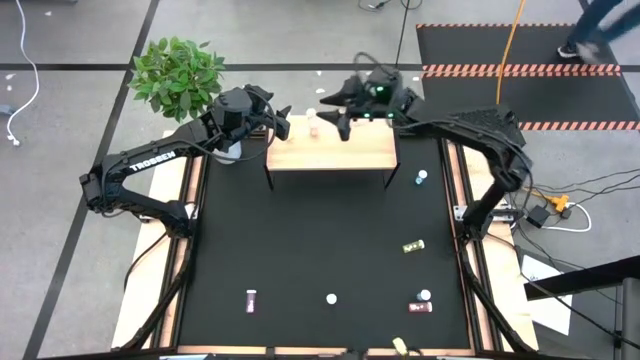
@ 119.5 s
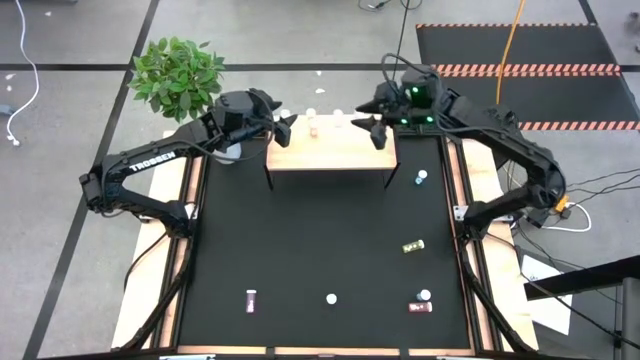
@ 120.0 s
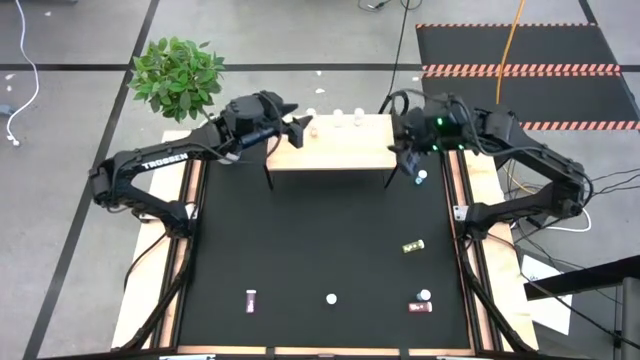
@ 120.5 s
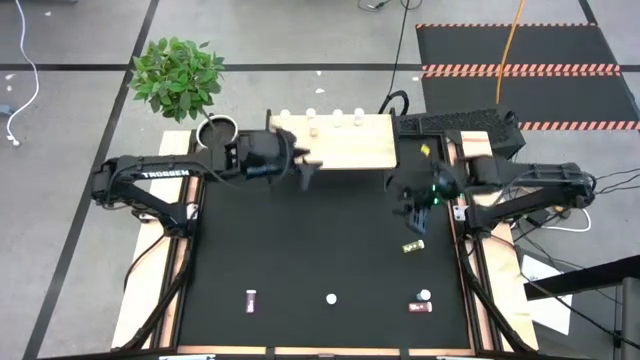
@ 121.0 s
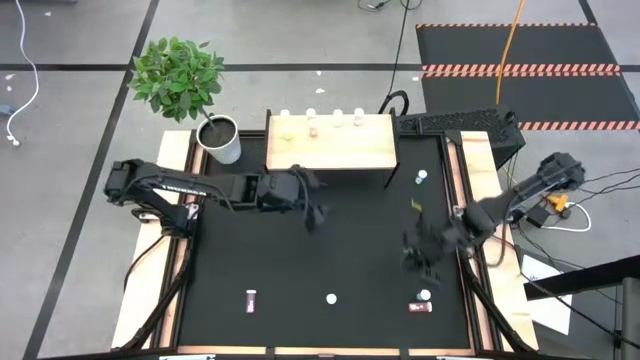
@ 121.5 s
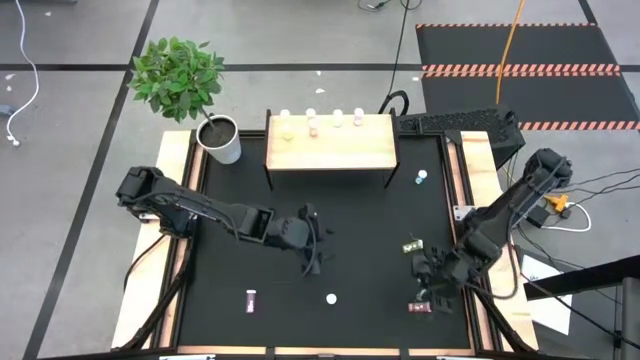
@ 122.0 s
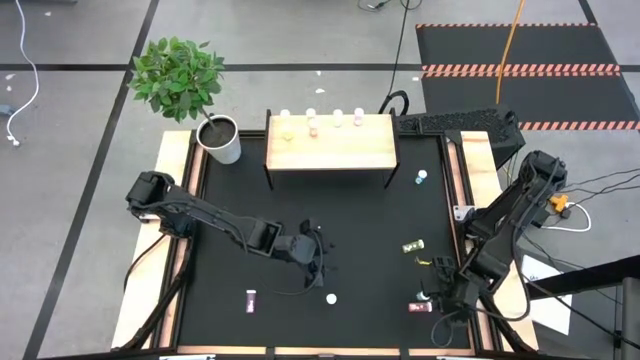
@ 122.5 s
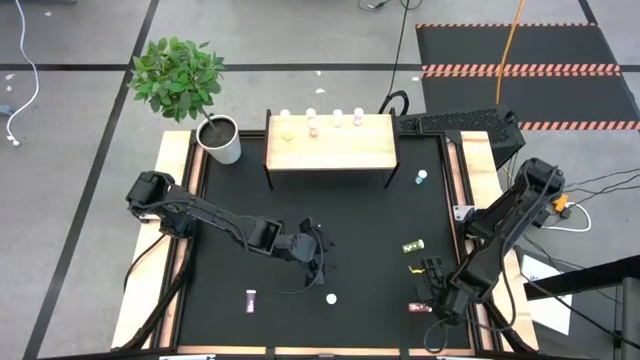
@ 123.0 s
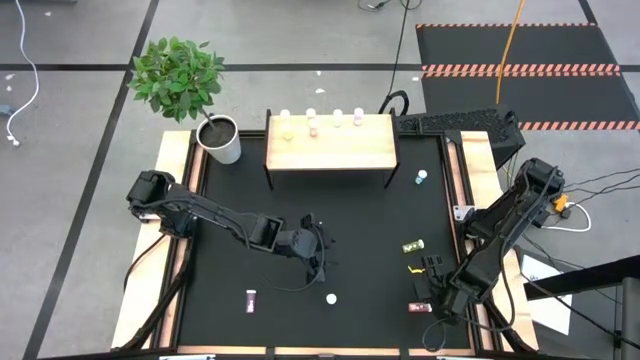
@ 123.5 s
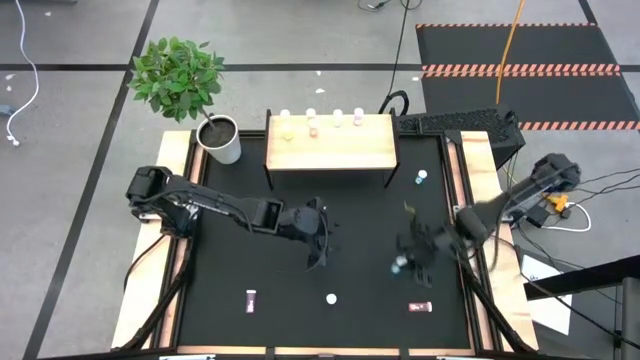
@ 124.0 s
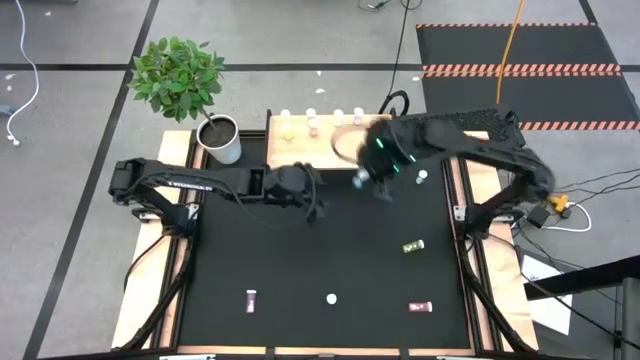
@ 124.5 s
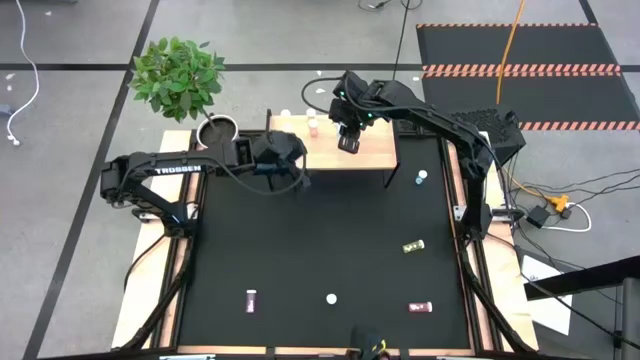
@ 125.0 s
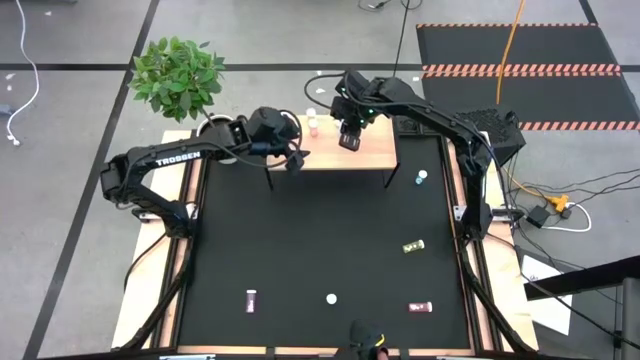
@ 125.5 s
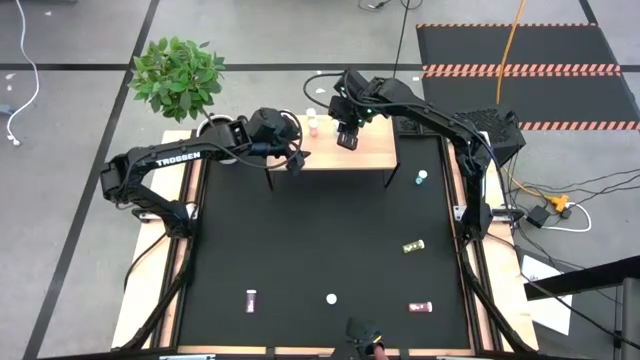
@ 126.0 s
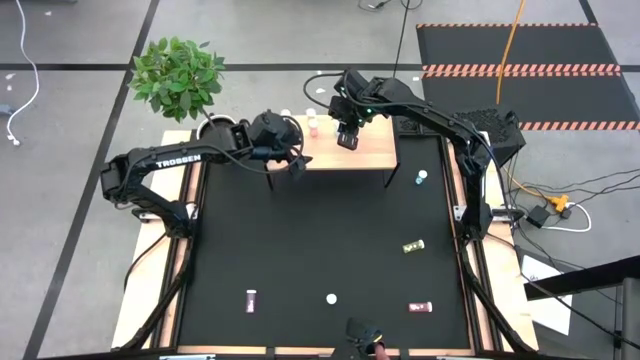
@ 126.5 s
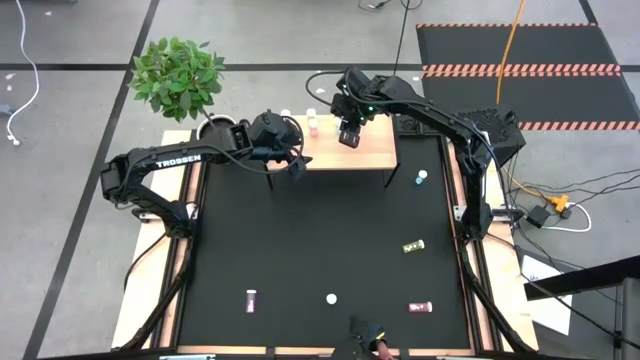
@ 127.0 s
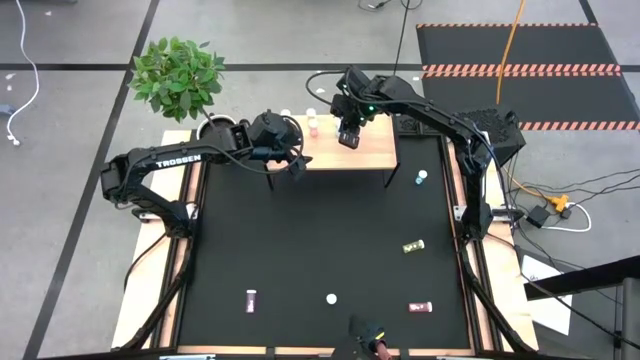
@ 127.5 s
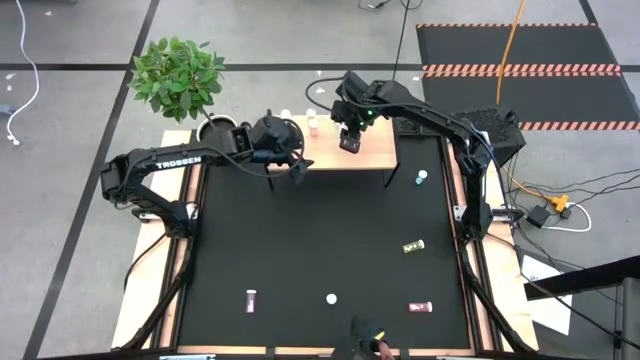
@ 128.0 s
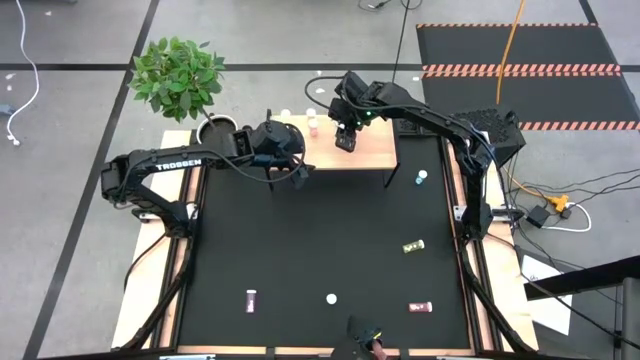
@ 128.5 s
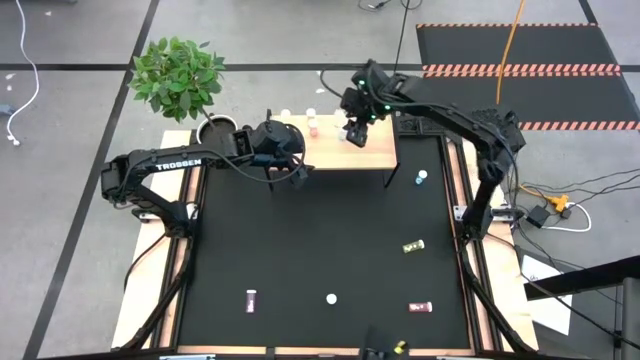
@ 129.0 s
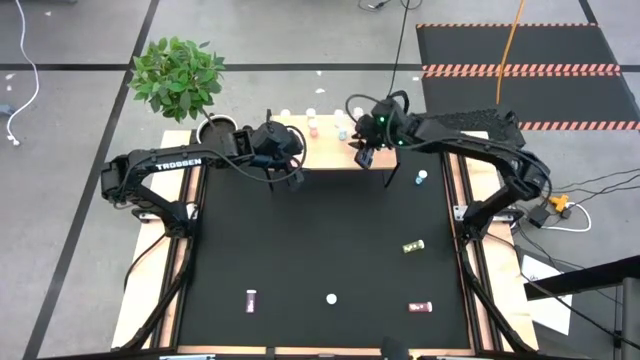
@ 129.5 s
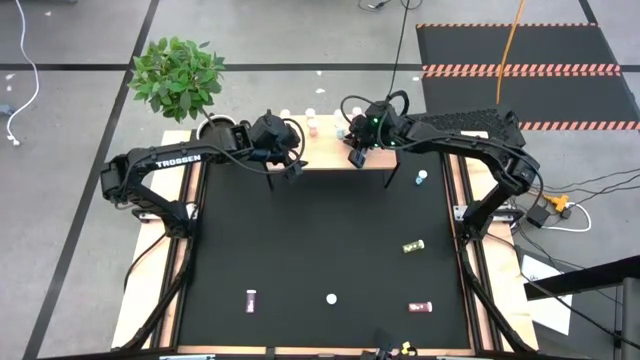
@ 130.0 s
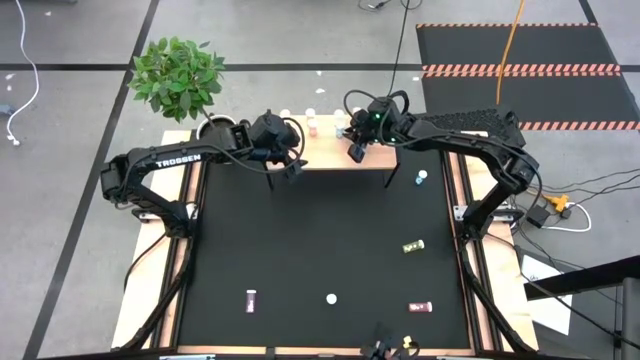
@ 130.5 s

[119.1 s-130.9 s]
Task: Pick and place medicine bottles onto shelf by color
Put the bottom blue pill bottle on the shelf aligned with the other blue pill bottle

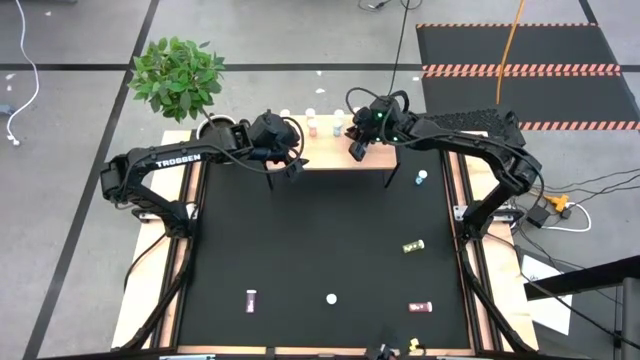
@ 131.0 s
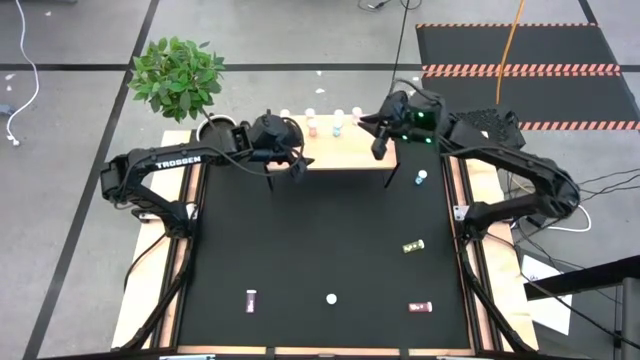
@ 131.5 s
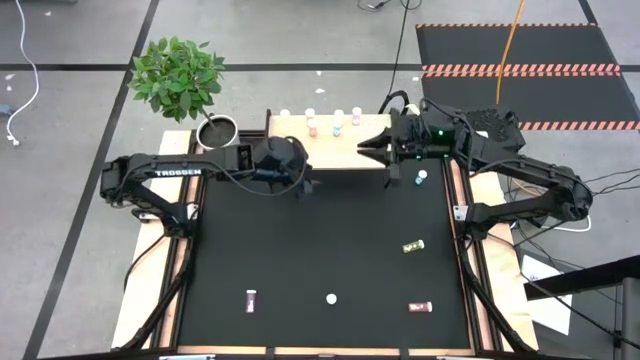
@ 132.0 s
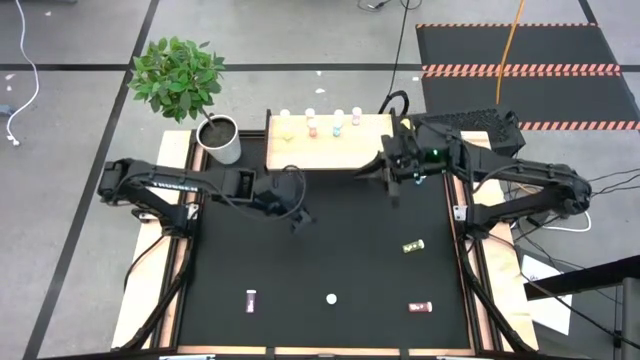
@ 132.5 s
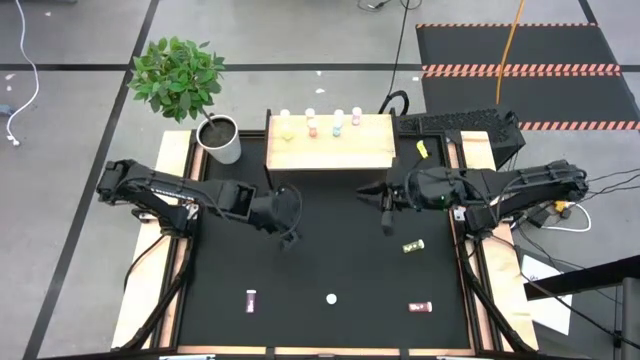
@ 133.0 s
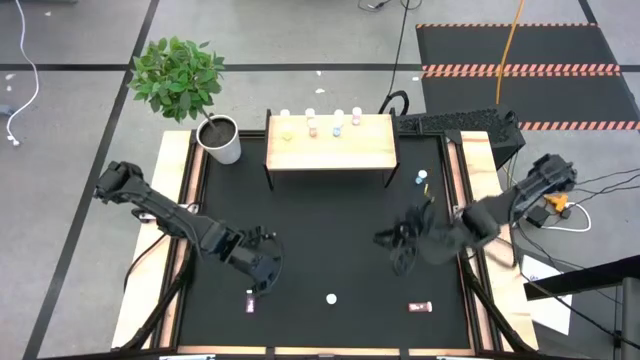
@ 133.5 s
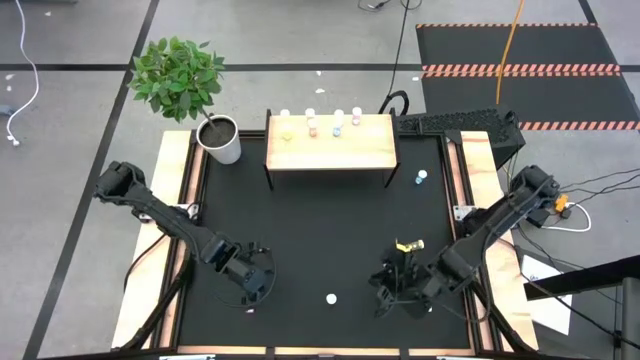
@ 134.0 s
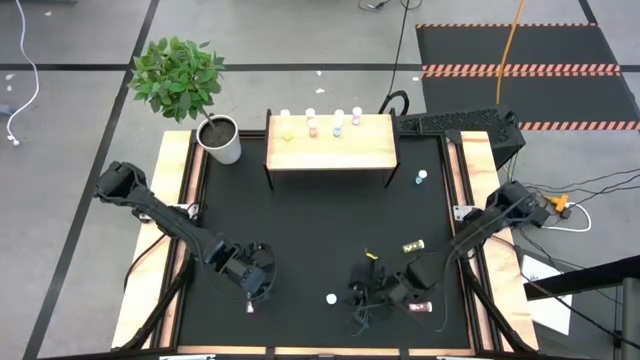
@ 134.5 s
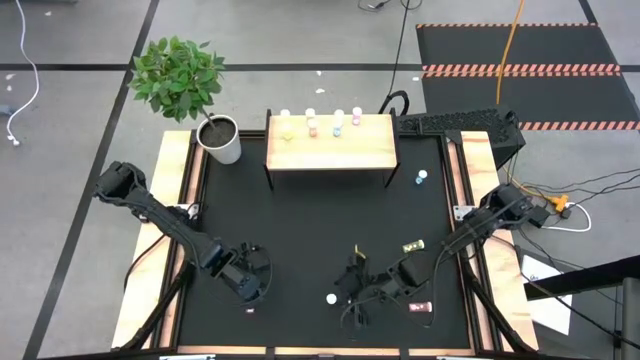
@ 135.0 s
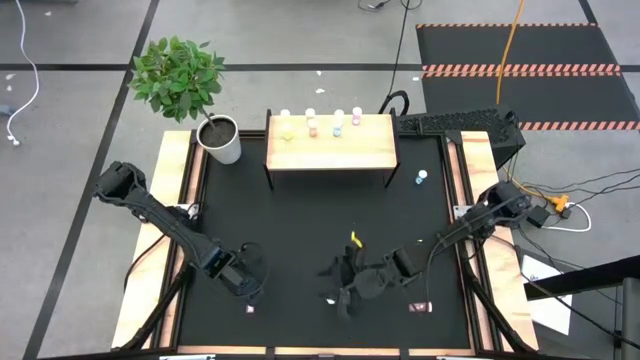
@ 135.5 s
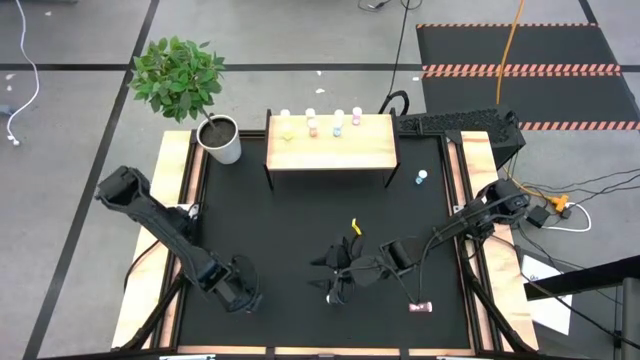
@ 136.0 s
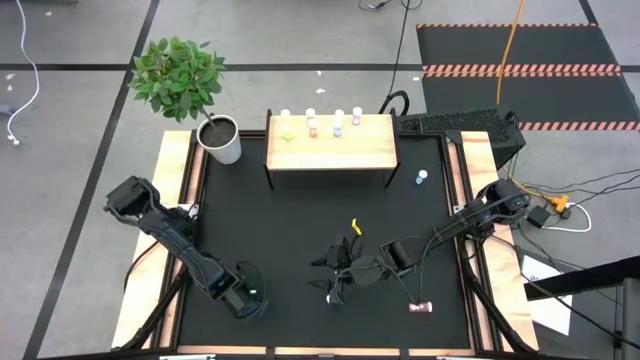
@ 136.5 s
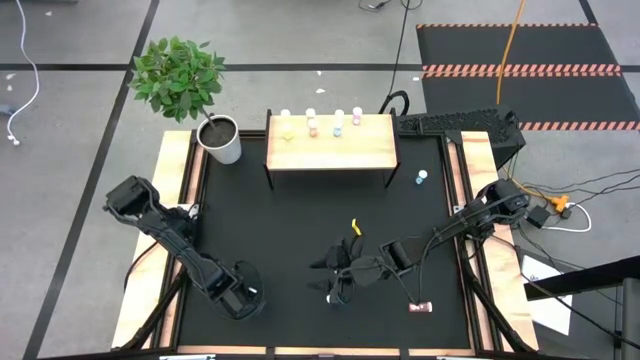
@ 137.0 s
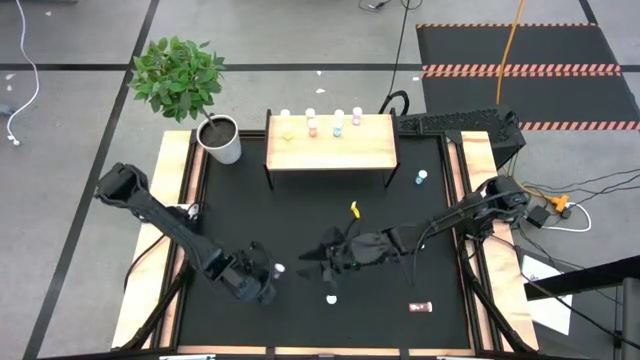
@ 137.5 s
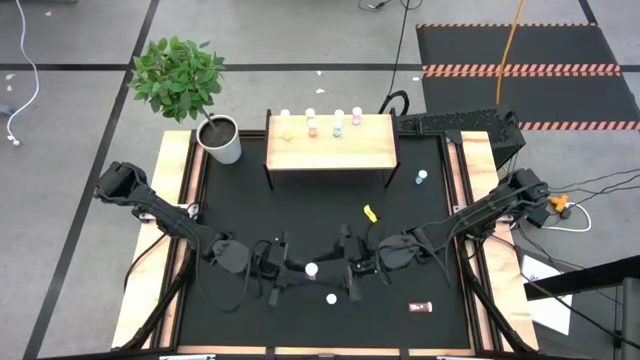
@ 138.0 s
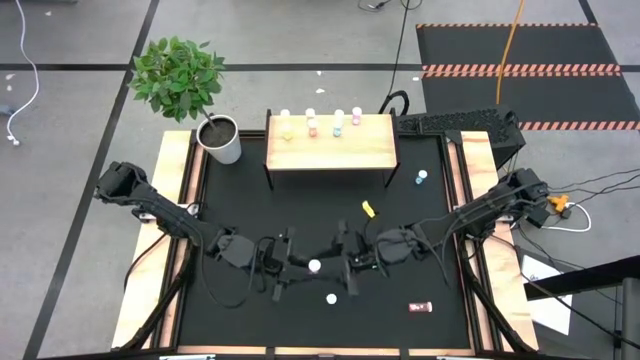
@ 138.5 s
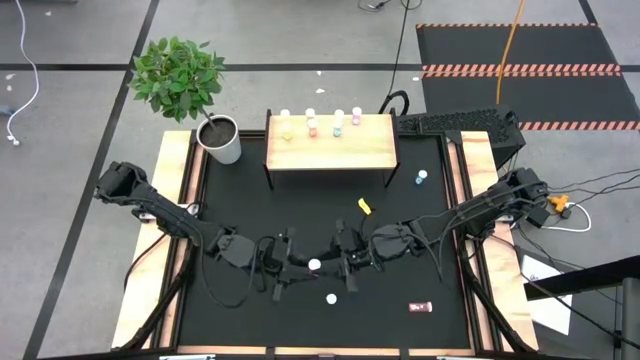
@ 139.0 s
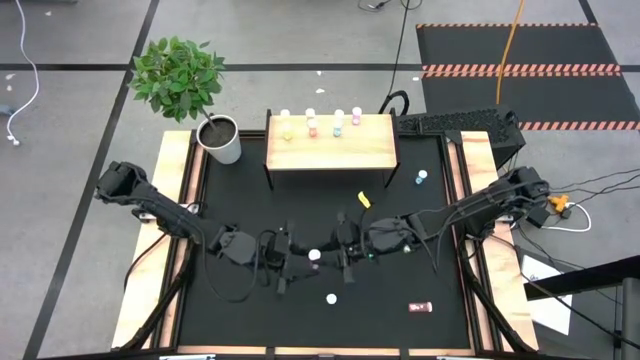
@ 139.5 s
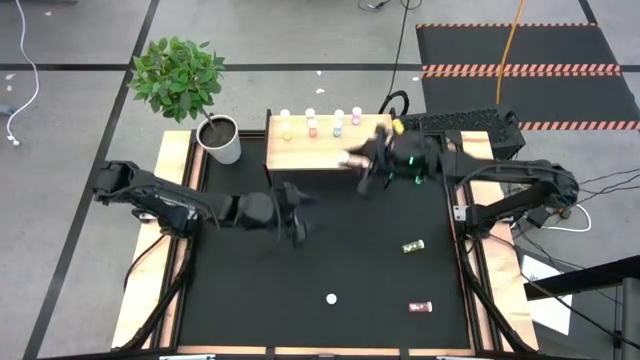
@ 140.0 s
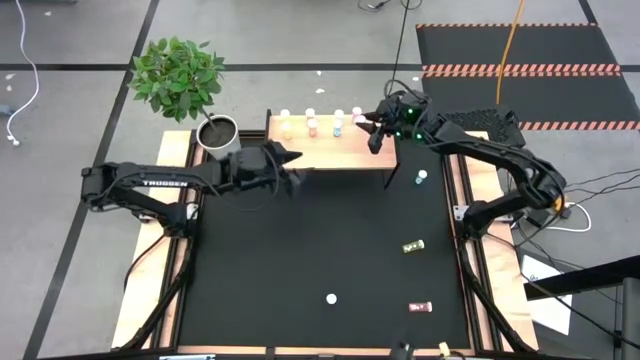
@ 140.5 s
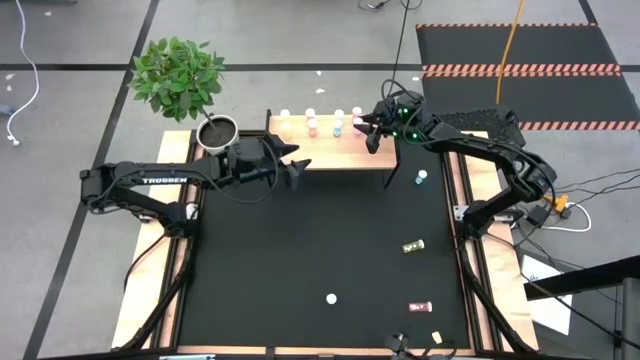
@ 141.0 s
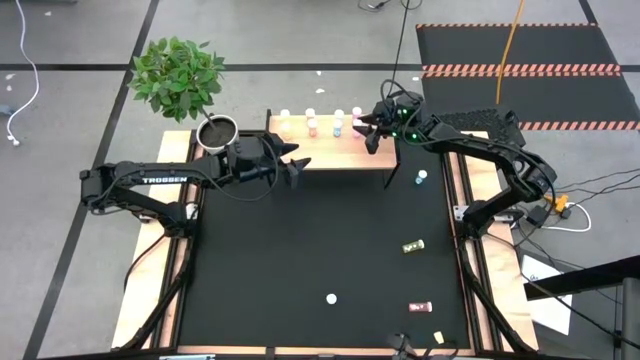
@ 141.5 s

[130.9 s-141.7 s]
Put the left pink pill bottle on the shelf aligned with the other pink pill bottle
